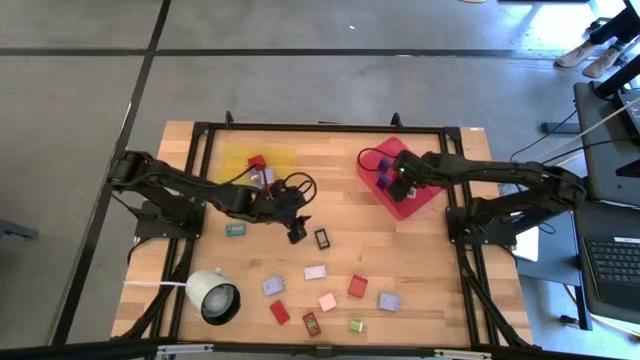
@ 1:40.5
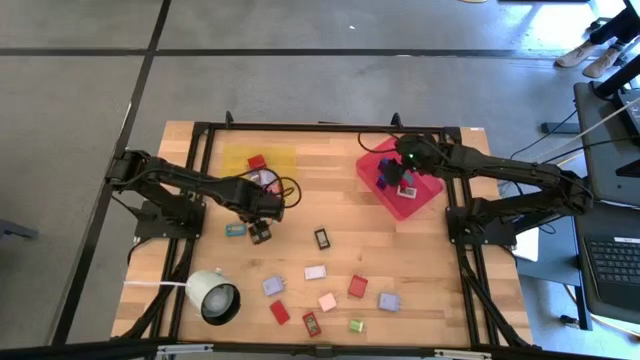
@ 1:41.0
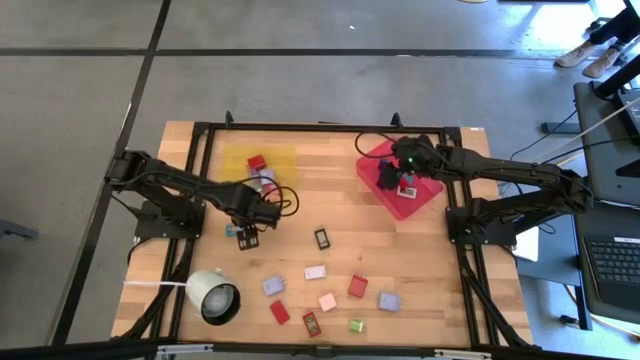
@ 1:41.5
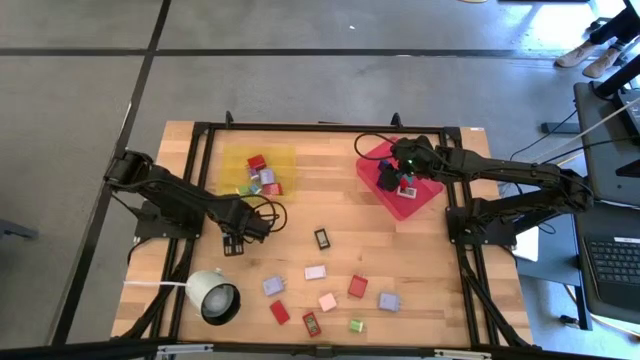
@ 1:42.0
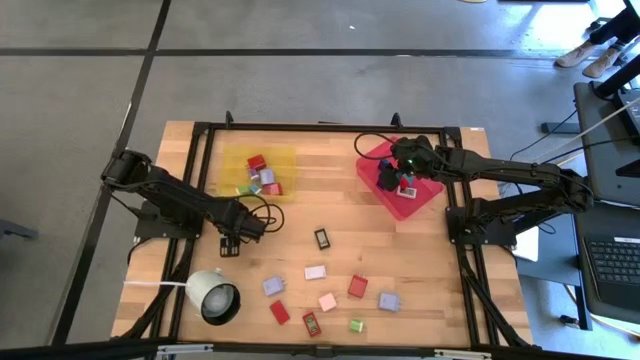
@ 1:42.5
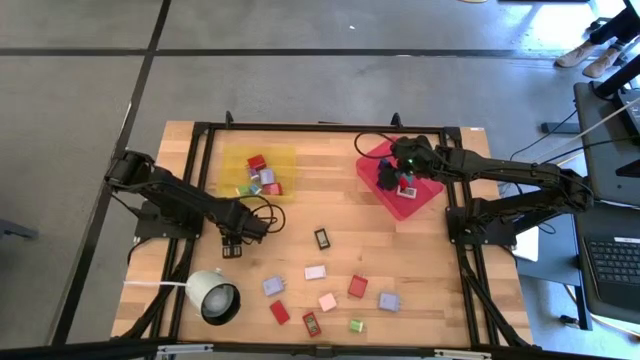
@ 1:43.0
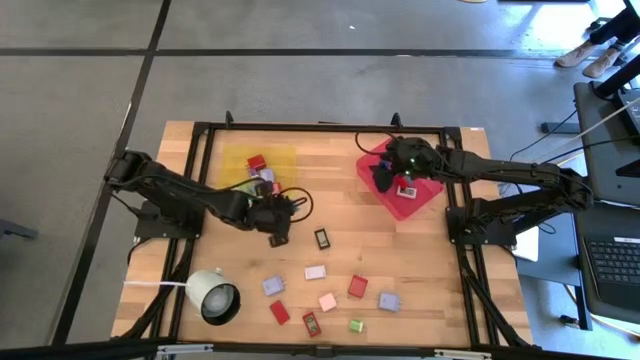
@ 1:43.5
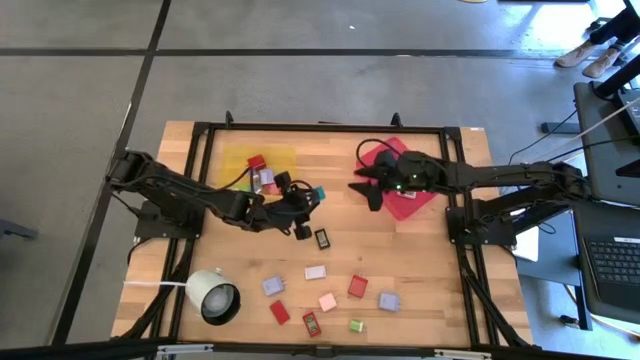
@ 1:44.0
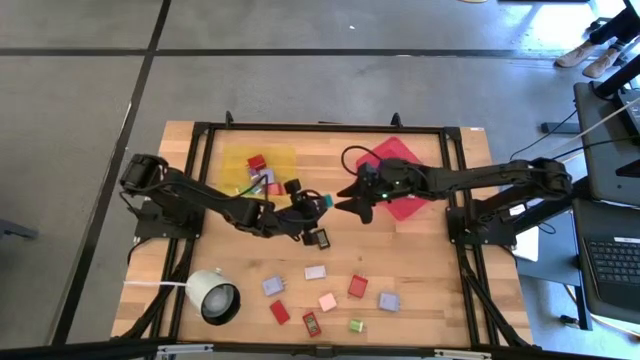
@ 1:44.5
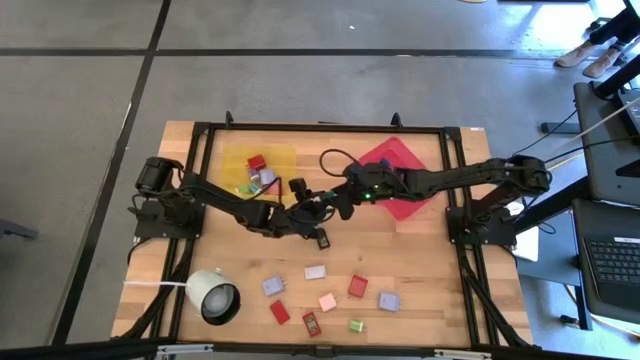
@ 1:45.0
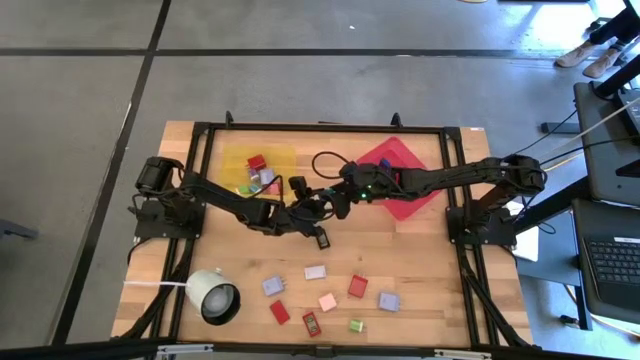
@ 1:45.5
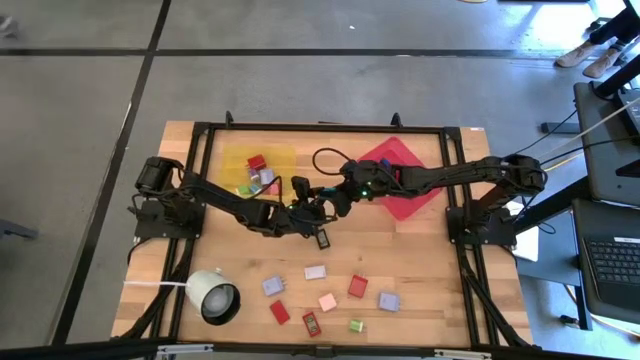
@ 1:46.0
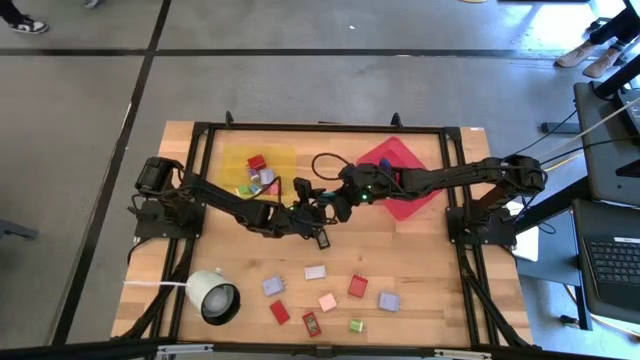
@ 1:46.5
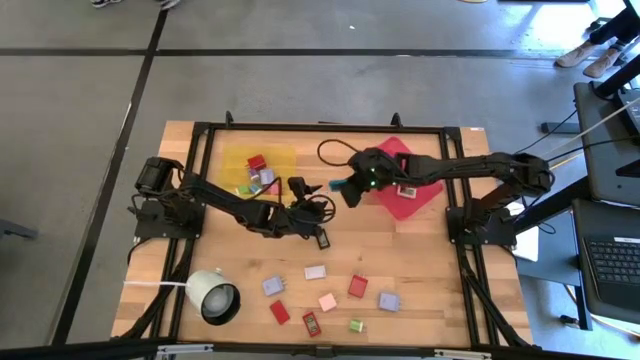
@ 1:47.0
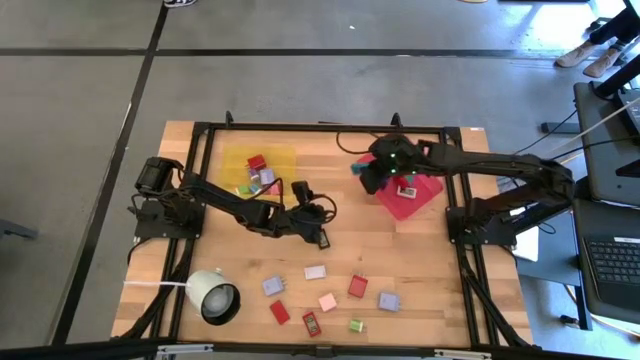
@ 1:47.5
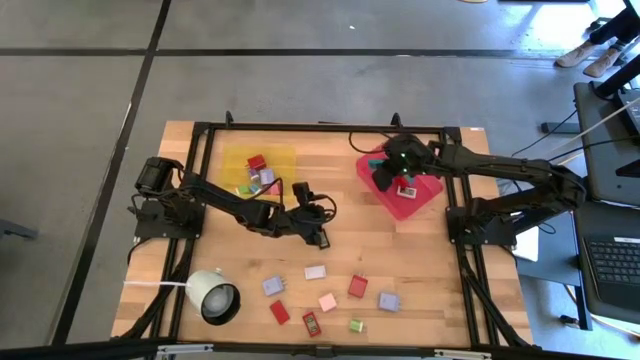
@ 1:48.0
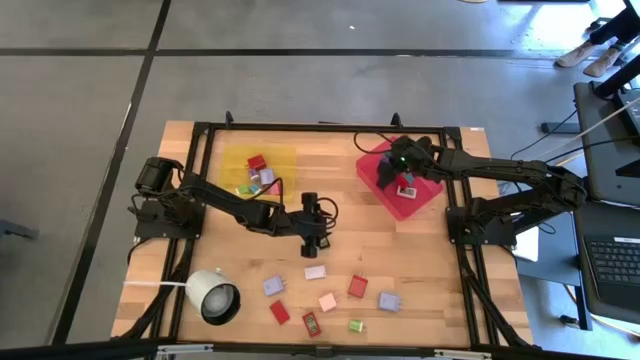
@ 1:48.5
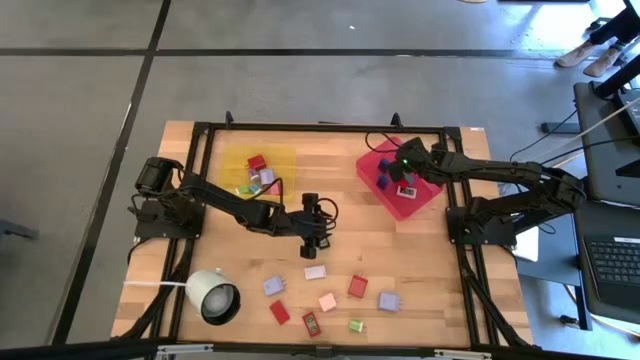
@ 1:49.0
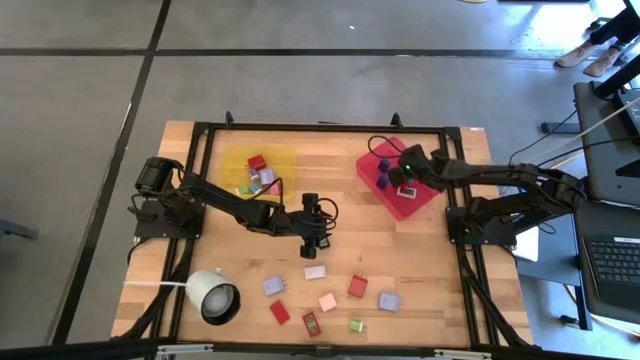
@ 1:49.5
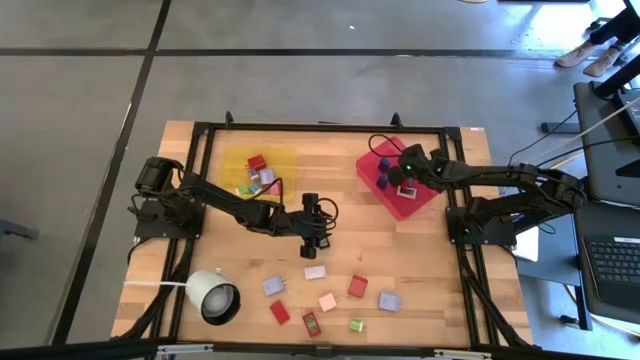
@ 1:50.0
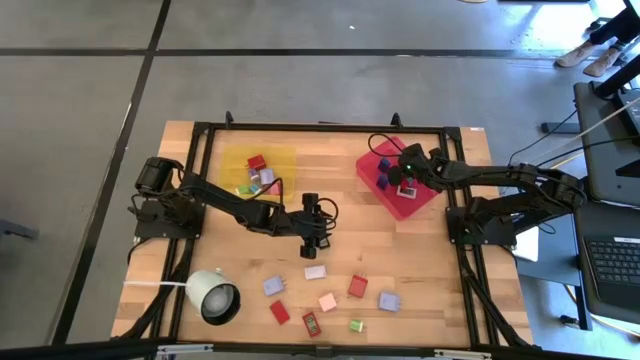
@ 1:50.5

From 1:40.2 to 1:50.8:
Task: Pick & Place Office items
Put the light blue digital clock into the pink bin

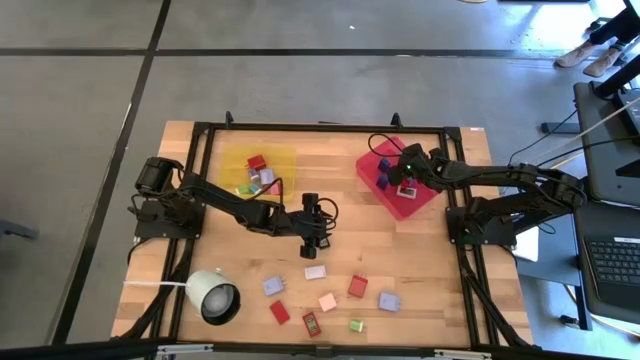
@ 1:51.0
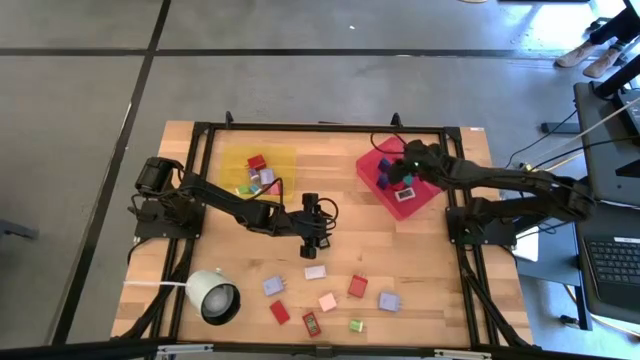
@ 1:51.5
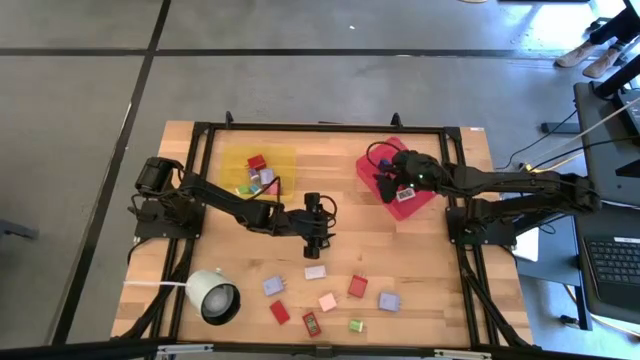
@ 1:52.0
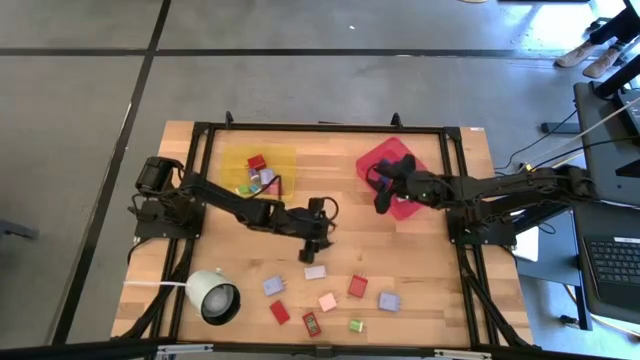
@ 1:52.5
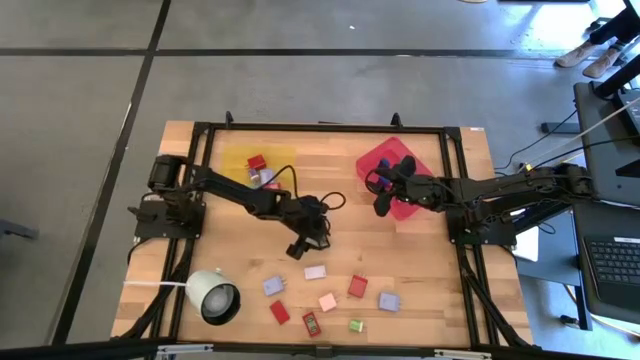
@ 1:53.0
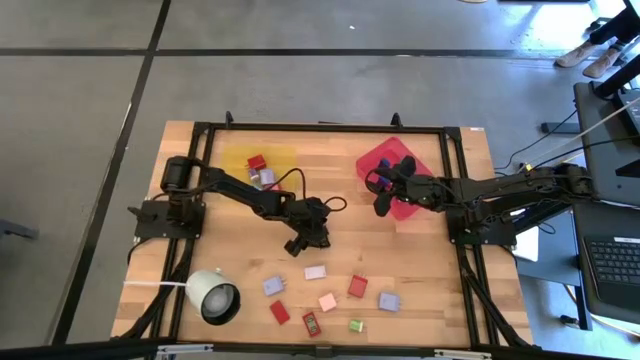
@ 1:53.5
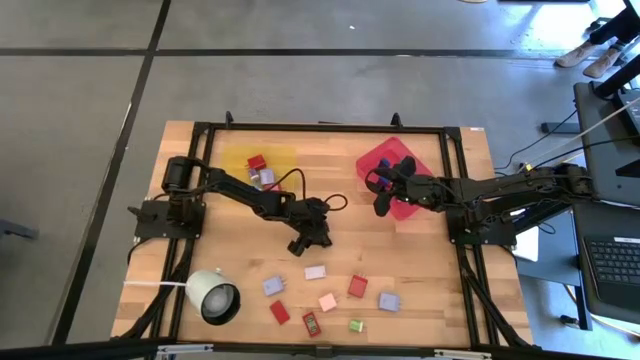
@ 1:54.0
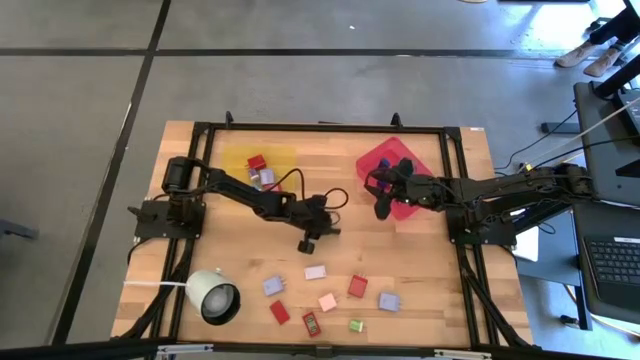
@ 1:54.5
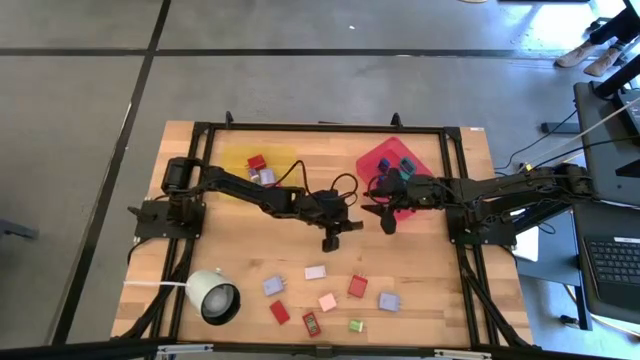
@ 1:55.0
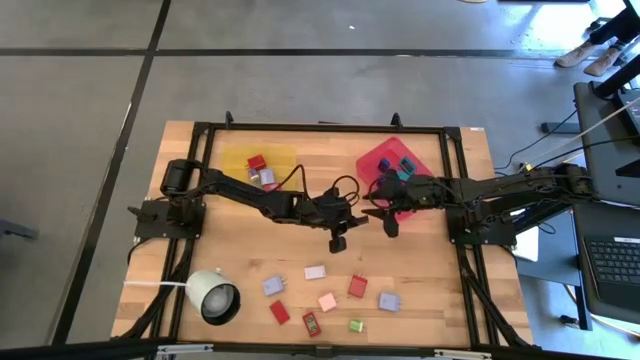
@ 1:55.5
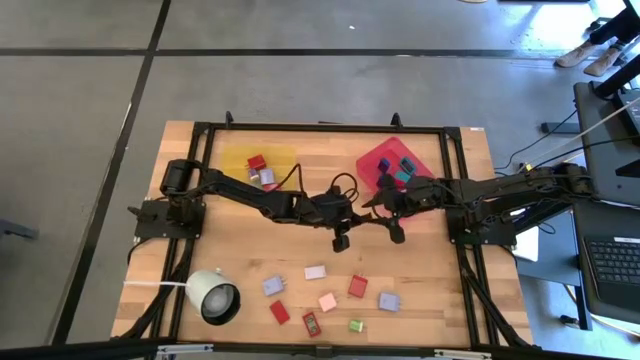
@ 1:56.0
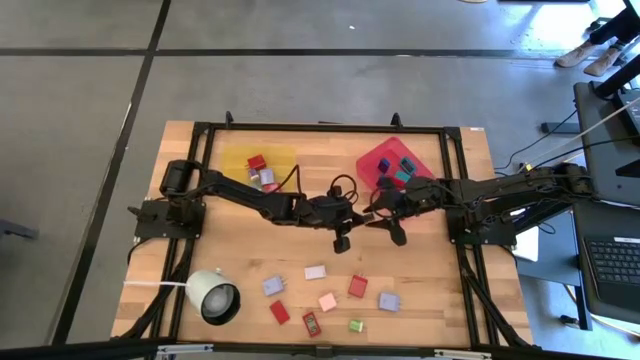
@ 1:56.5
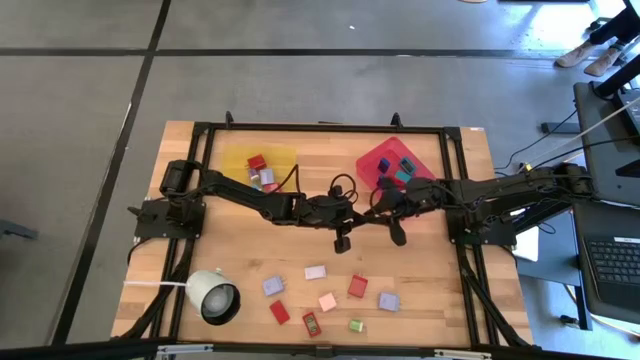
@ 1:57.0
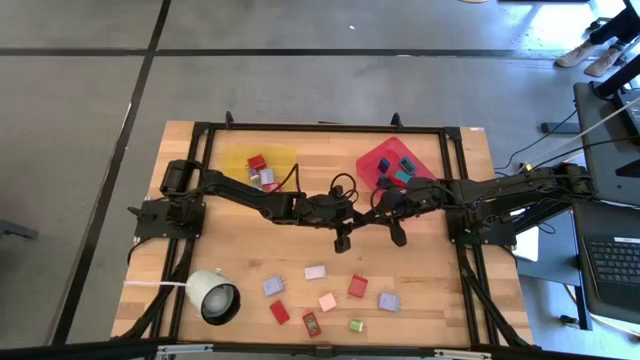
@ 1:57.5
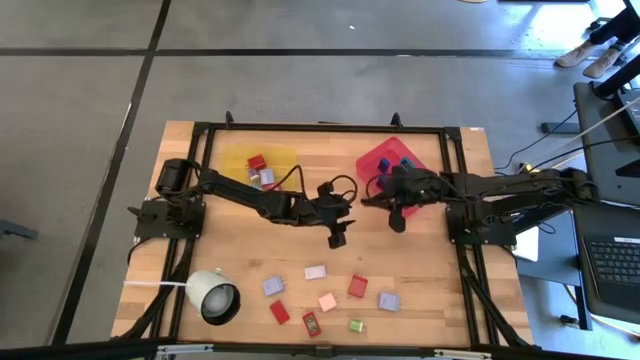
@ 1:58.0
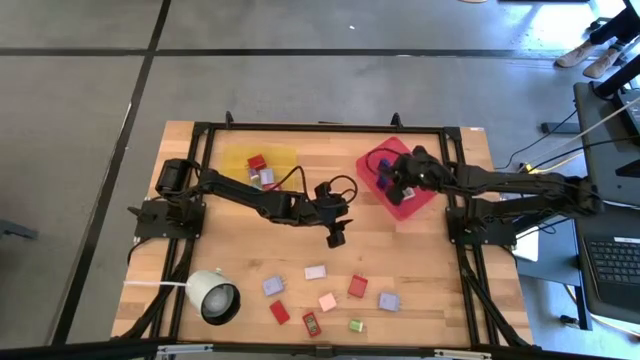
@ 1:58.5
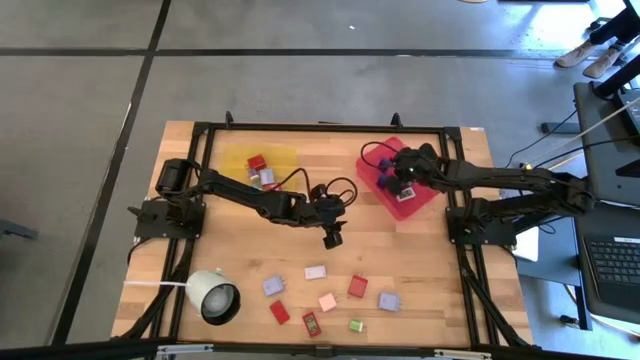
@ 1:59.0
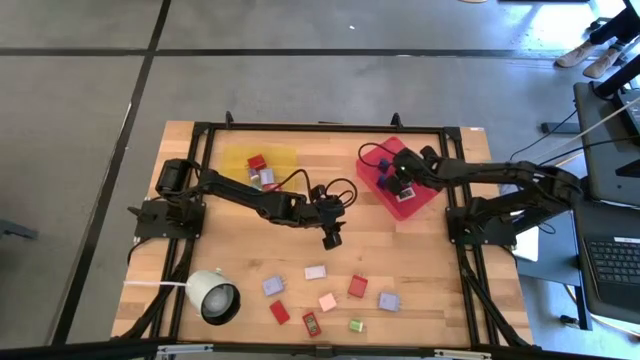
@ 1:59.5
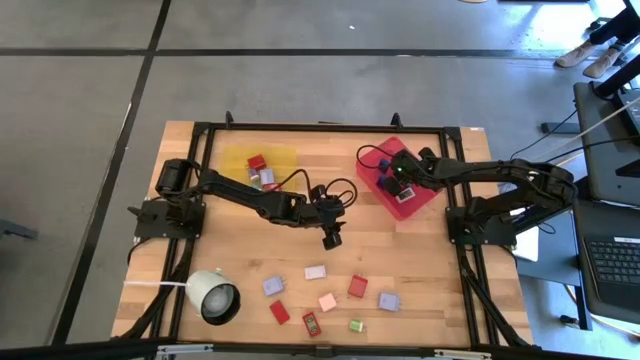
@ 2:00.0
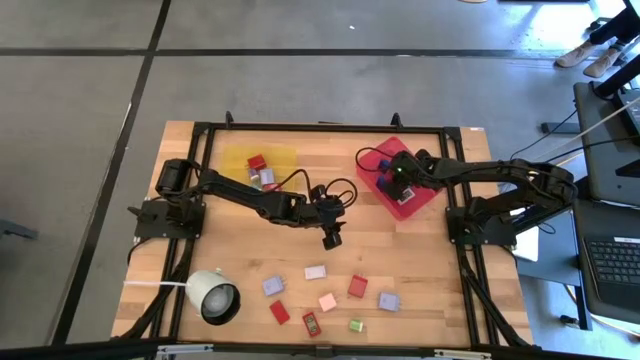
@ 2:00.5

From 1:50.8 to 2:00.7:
Put the black digital clock into the pink bin
